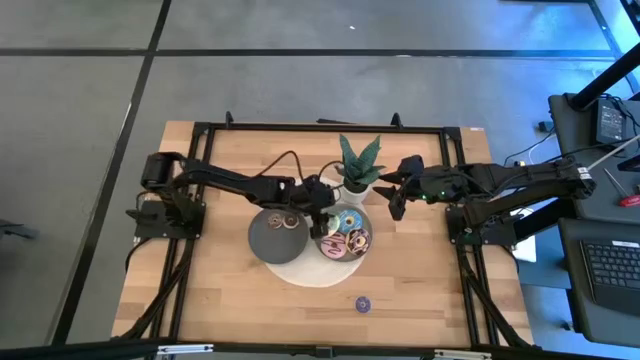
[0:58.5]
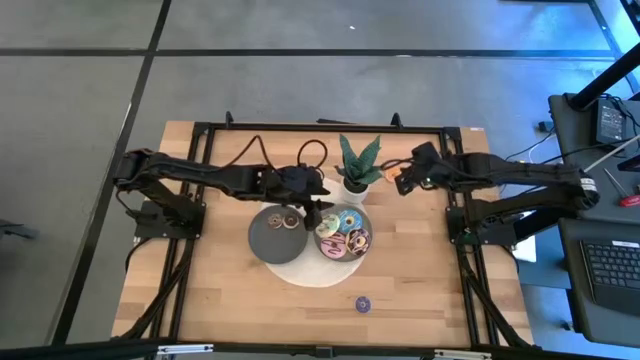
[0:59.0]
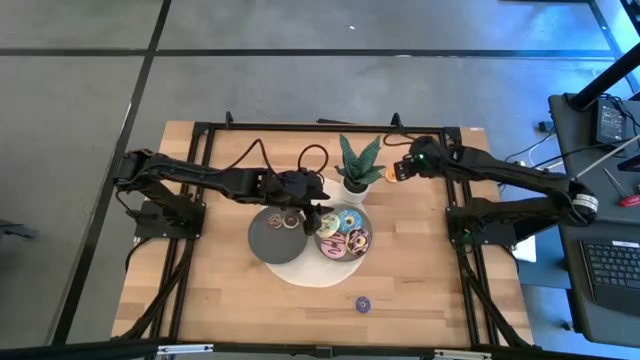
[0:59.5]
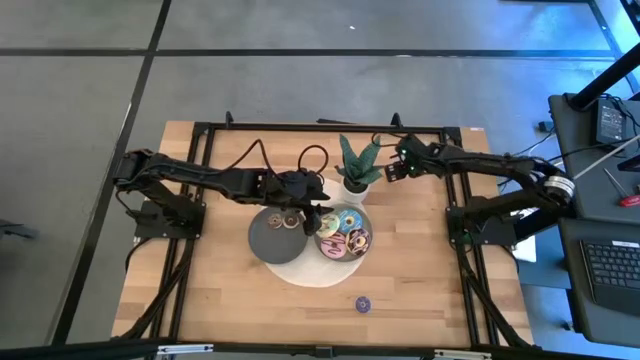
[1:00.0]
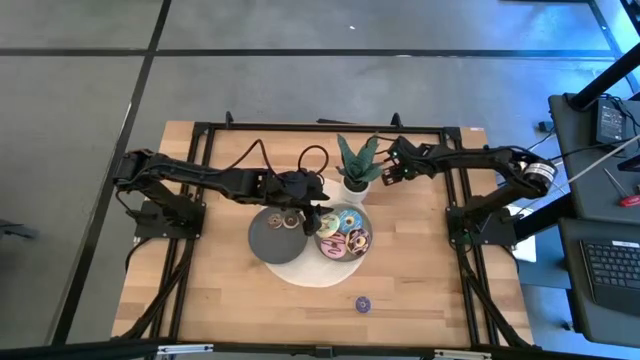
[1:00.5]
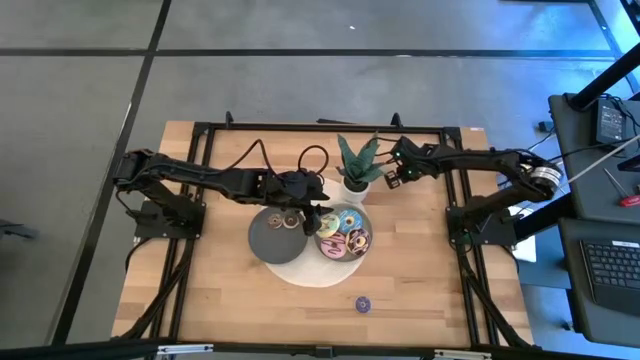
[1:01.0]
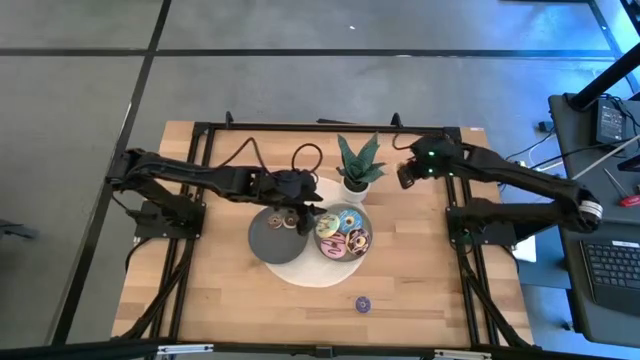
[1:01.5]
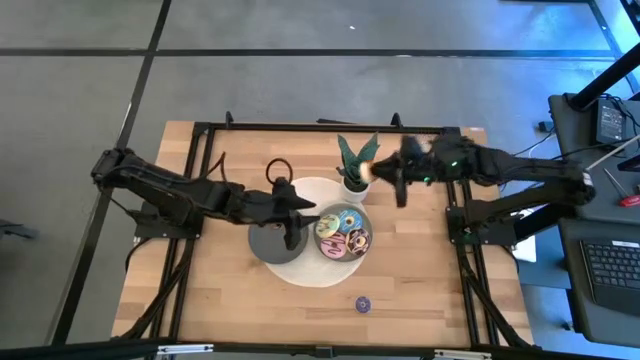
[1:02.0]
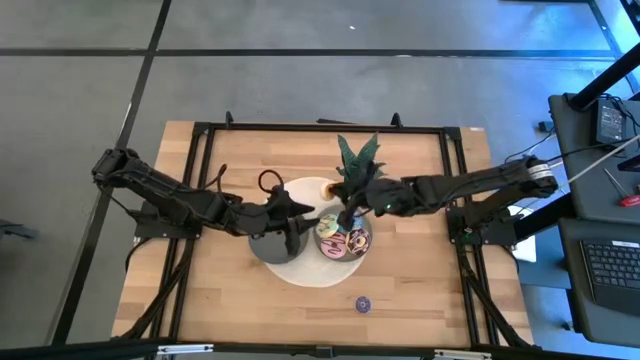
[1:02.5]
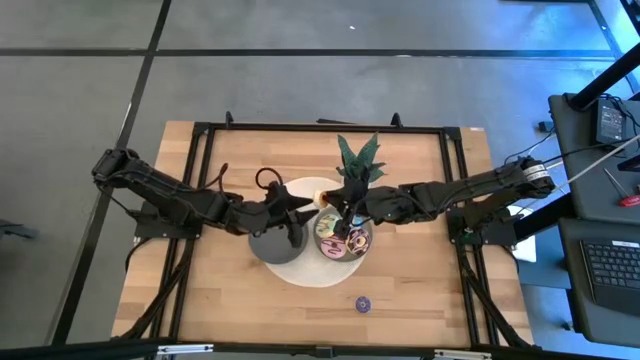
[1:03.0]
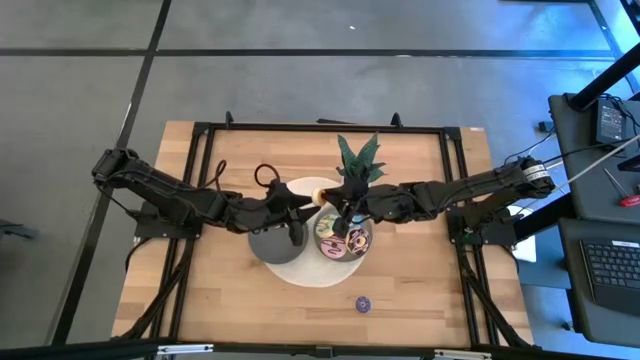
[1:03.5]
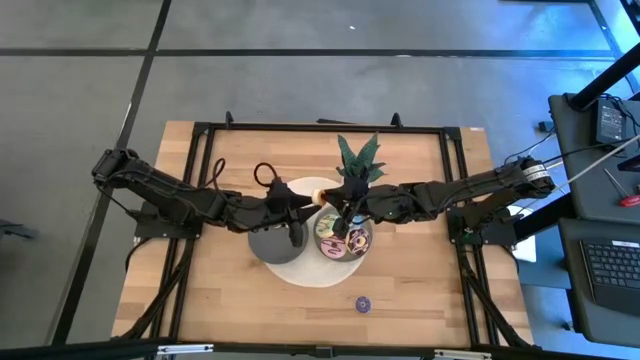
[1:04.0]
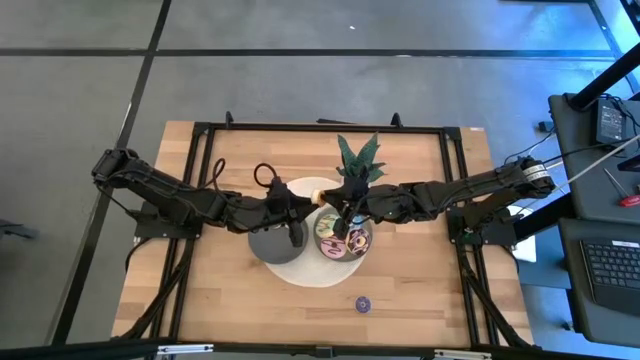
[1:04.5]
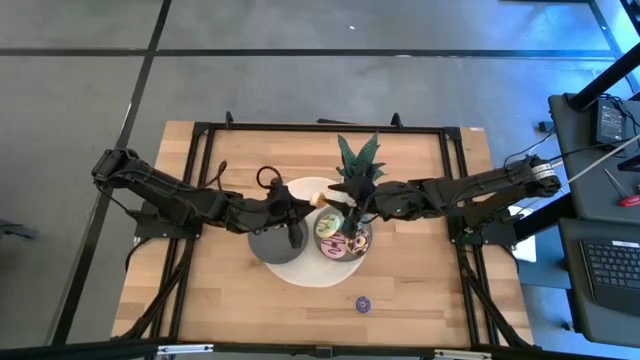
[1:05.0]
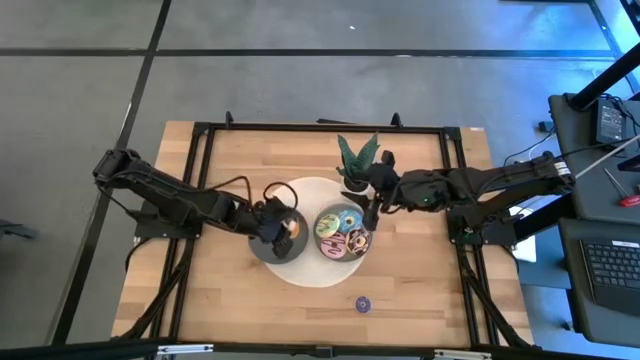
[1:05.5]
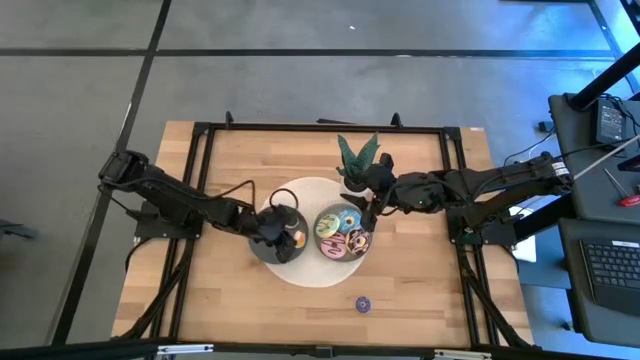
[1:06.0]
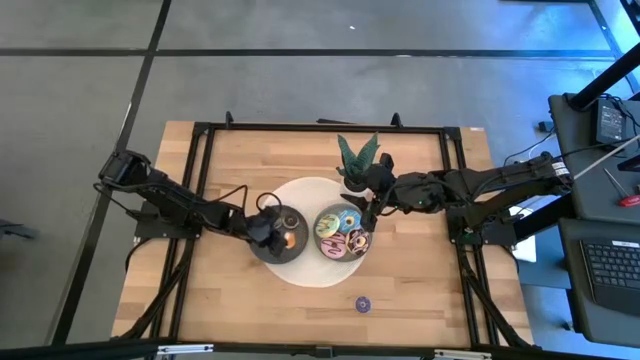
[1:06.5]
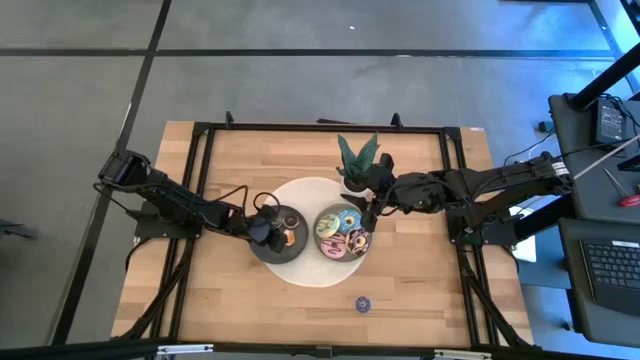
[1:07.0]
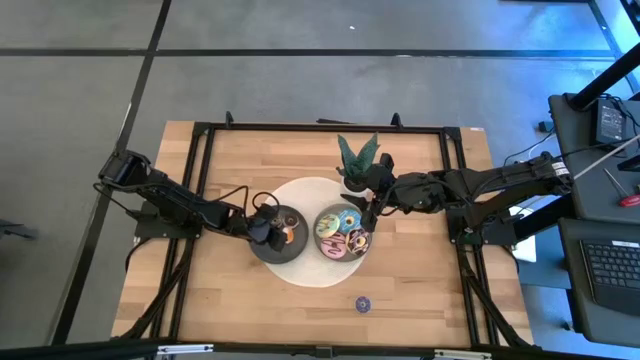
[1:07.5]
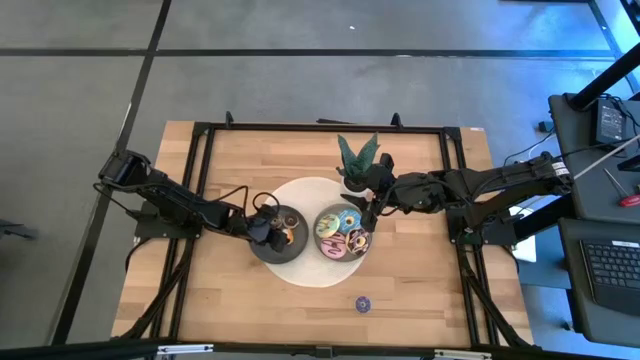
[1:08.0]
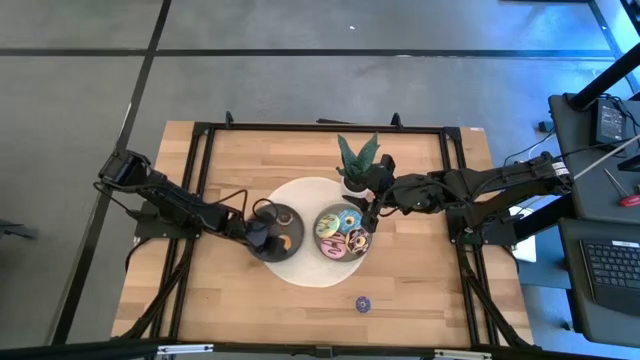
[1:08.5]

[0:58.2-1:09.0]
Task: Pick & Place donuts
Put the small yellow doughnut on the dark gray plate

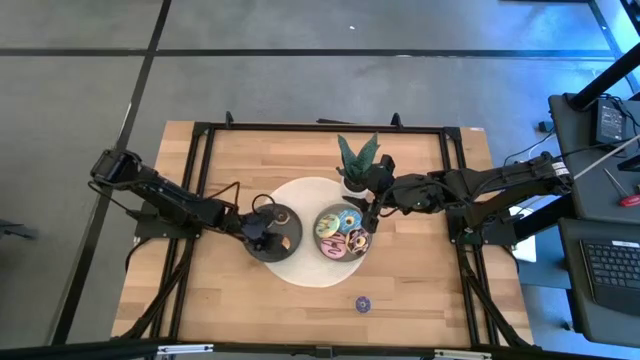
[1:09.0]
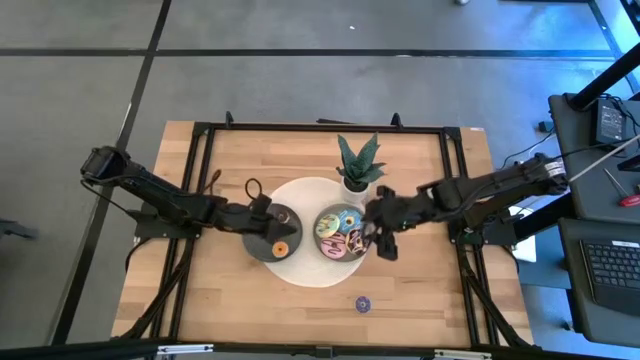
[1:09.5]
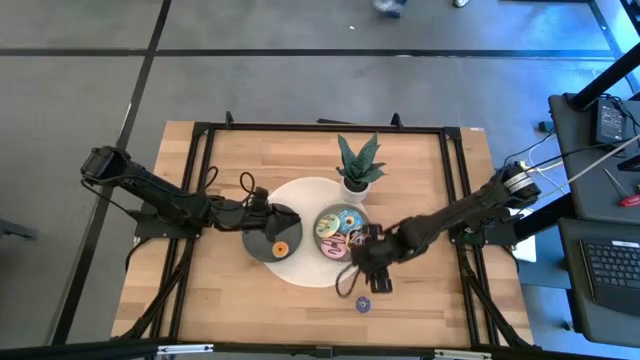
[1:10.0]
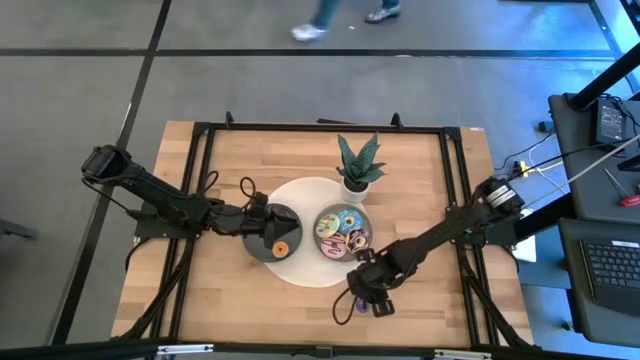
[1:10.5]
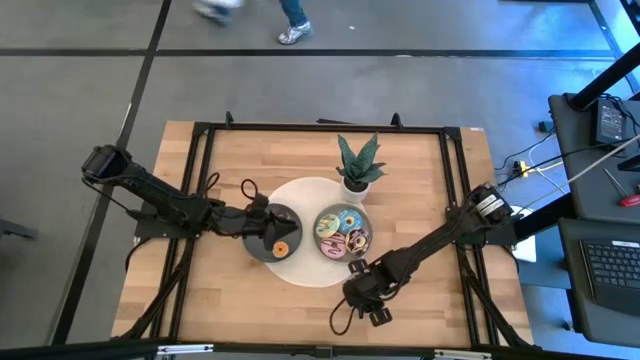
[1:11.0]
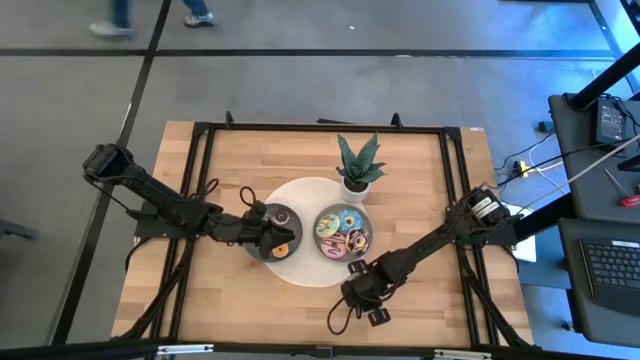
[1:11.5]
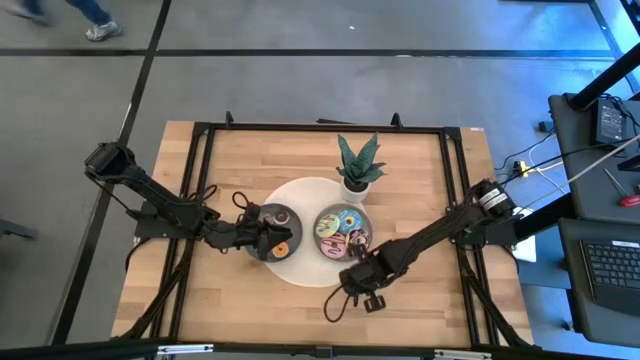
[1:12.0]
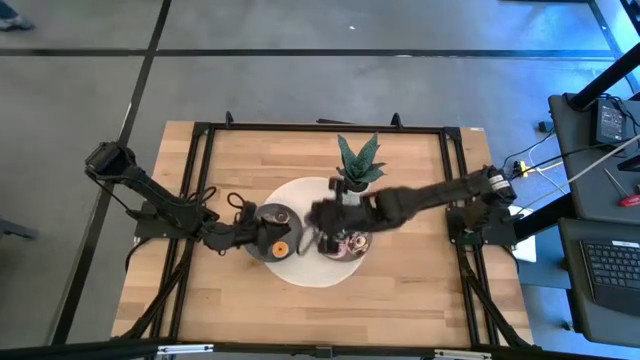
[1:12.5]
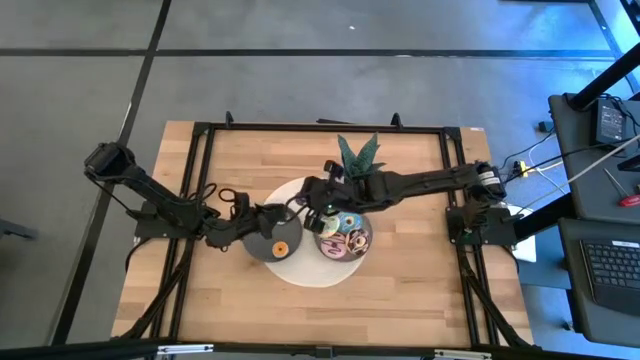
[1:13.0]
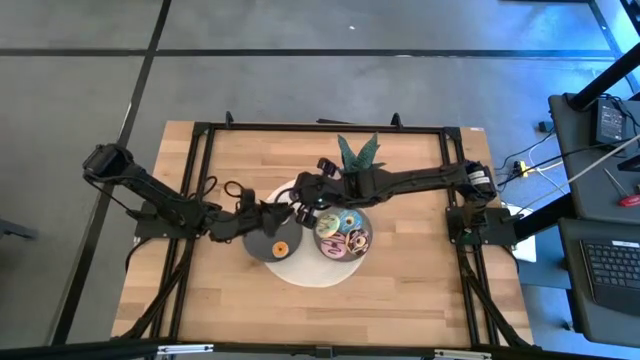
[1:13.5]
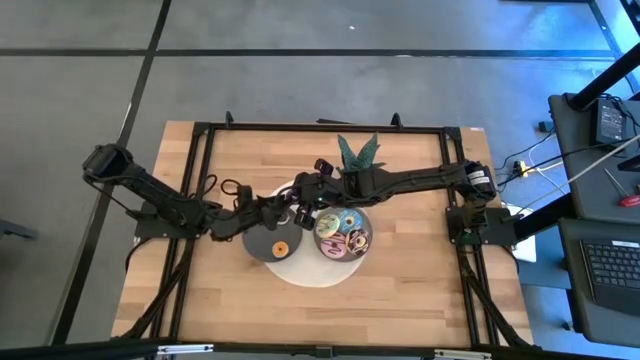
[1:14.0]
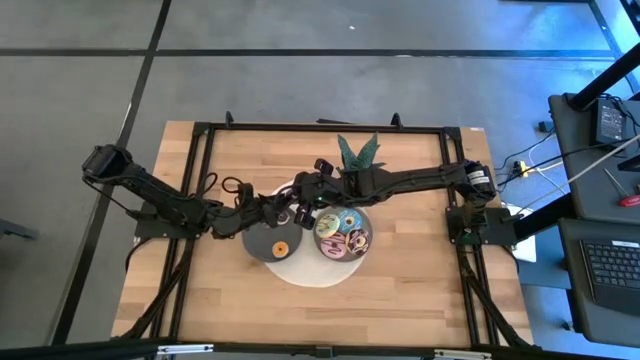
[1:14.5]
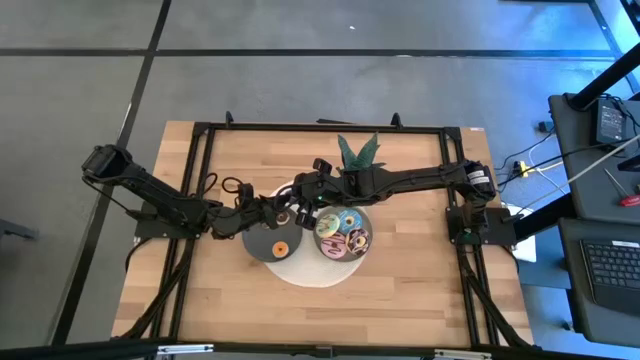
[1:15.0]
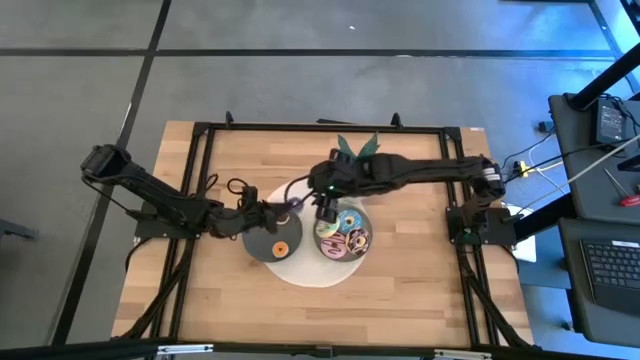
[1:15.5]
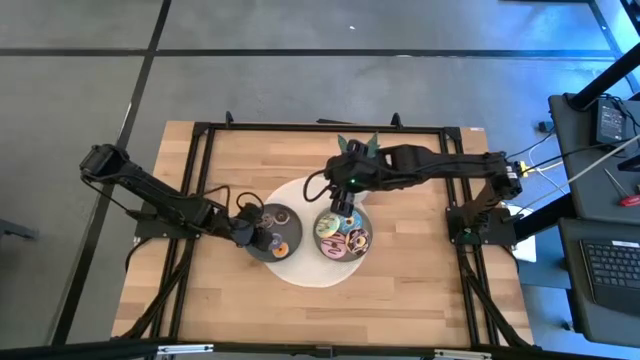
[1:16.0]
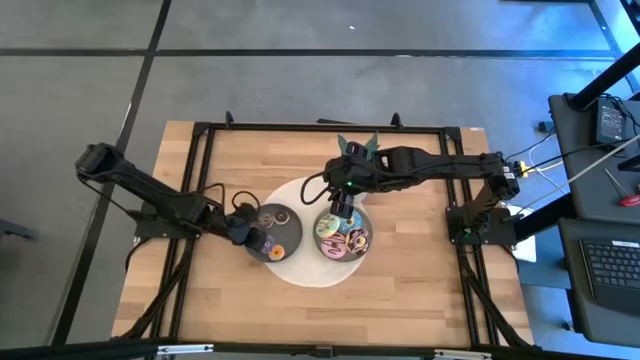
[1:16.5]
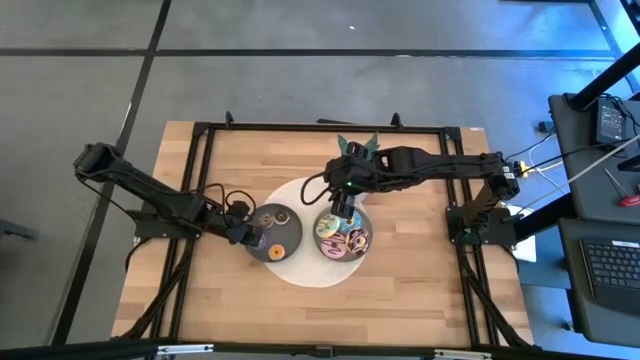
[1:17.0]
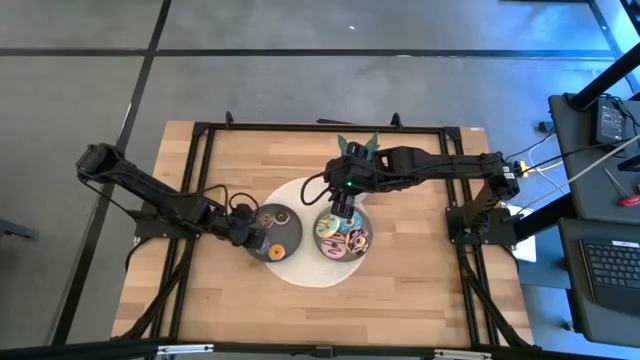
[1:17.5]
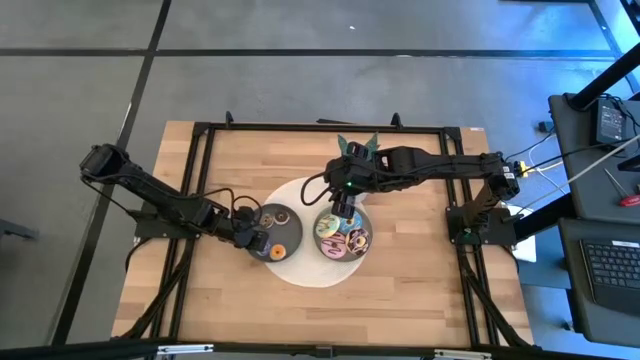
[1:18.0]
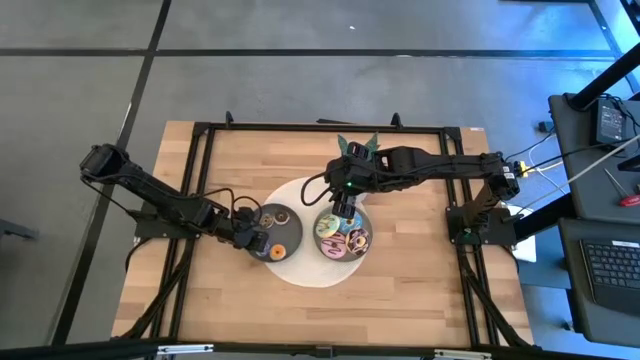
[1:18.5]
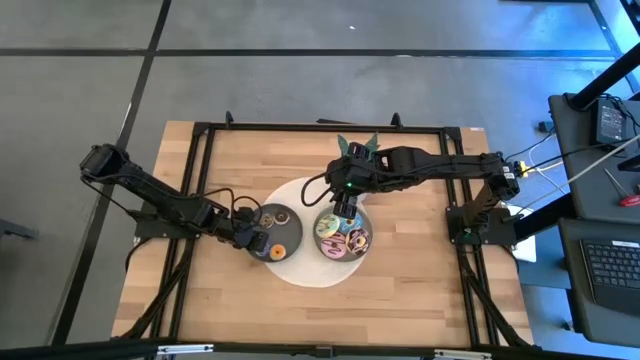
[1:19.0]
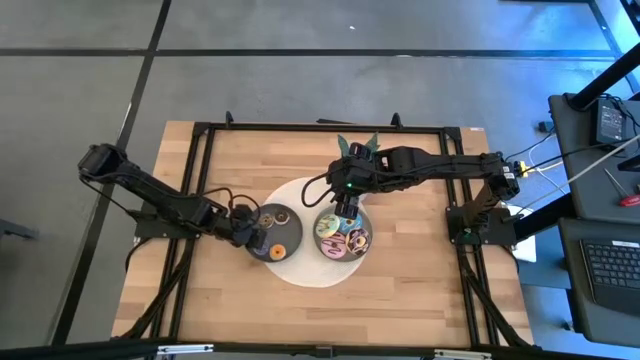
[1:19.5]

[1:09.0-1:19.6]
Put the small blue doughnut on the dark gray plate

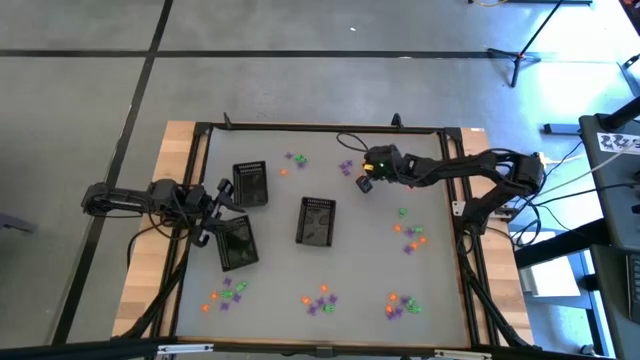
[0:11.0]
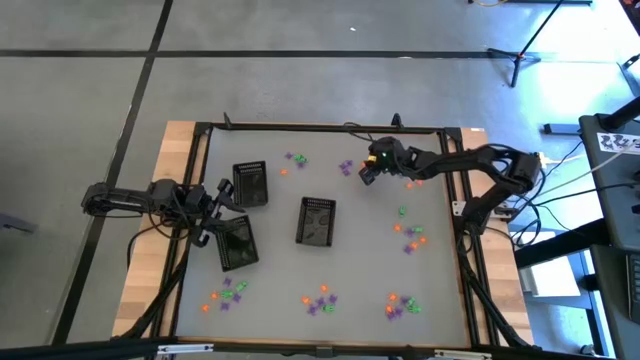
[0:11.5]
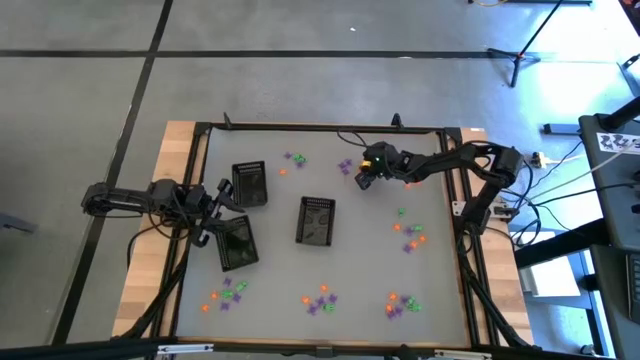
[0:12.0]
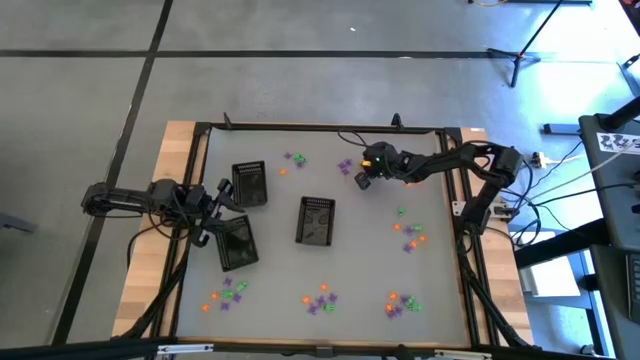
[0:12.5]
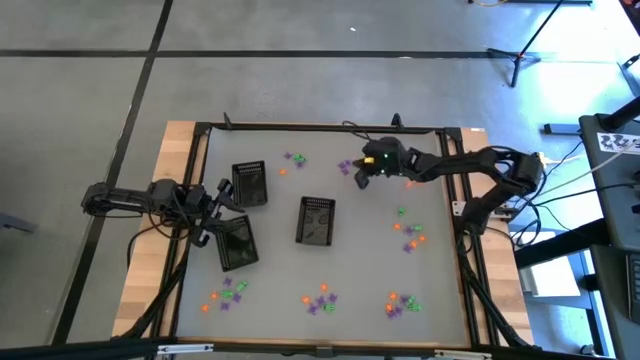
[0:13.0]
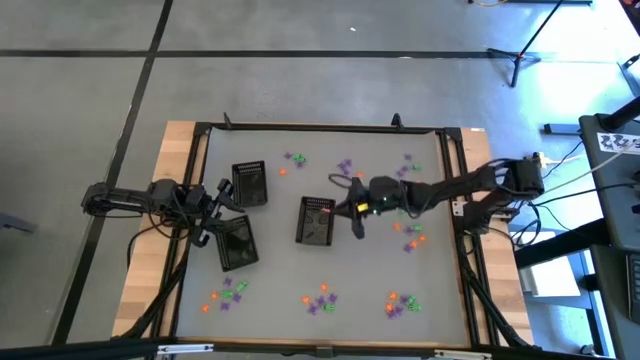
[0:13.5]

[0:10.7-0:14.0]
Task: Sort Halloween decoration
Put the orange spider toy into the bottom right black basket
